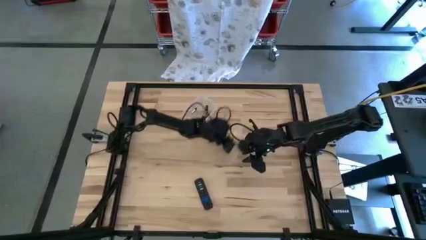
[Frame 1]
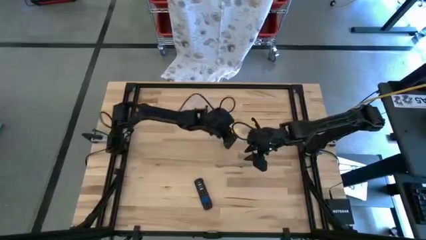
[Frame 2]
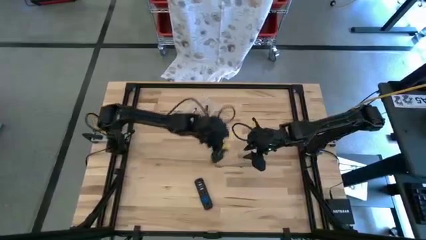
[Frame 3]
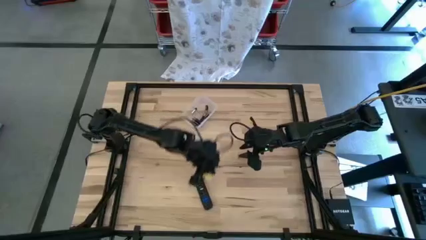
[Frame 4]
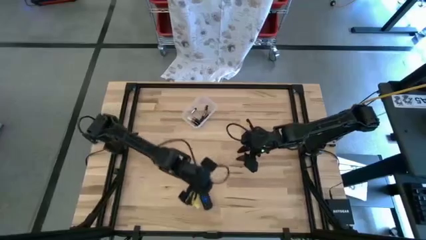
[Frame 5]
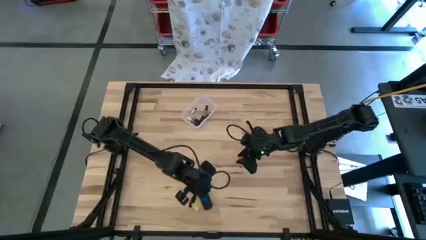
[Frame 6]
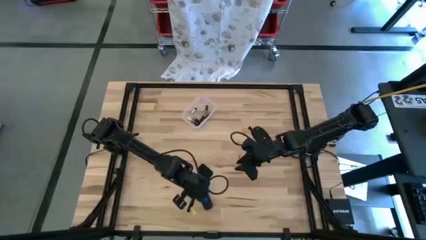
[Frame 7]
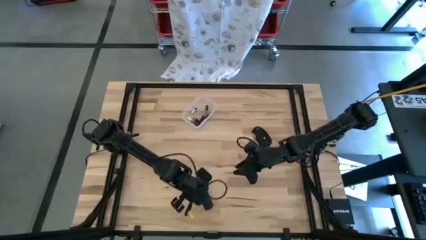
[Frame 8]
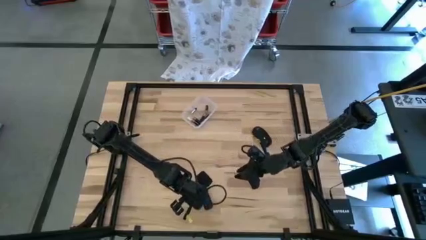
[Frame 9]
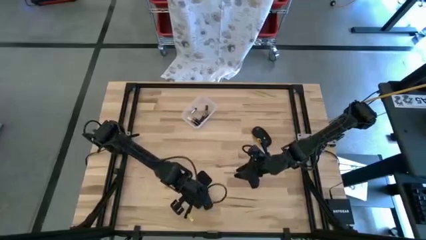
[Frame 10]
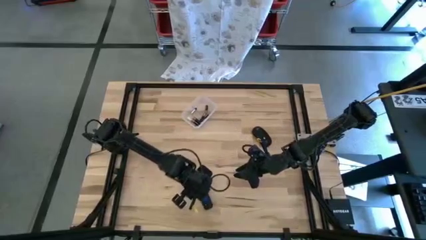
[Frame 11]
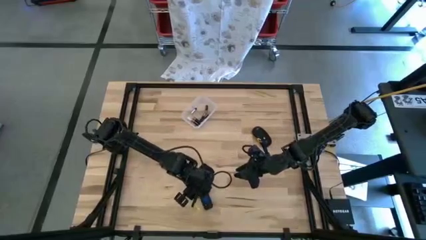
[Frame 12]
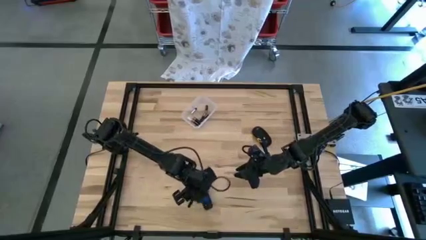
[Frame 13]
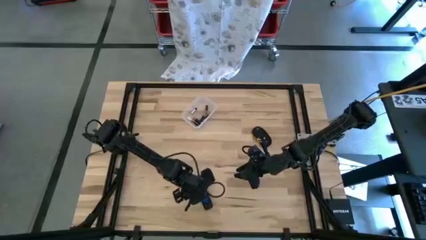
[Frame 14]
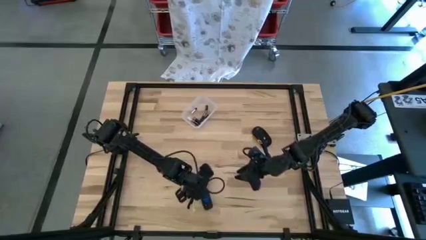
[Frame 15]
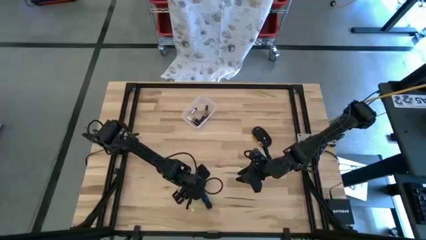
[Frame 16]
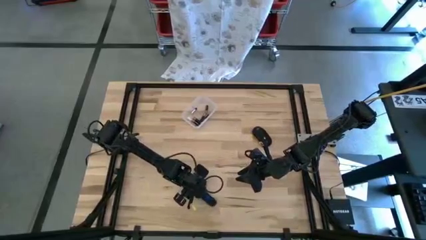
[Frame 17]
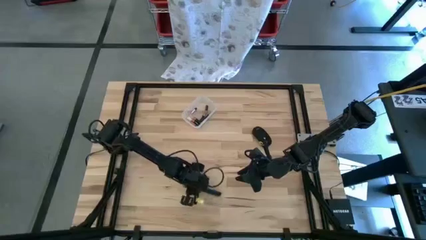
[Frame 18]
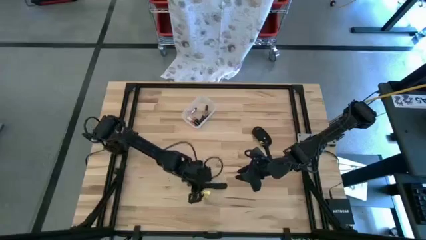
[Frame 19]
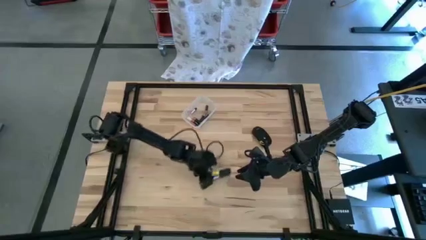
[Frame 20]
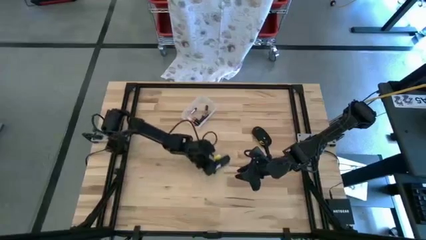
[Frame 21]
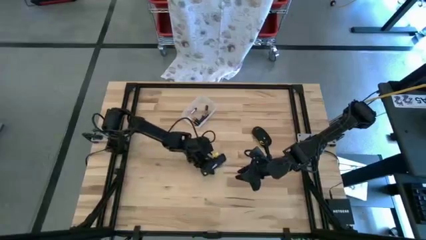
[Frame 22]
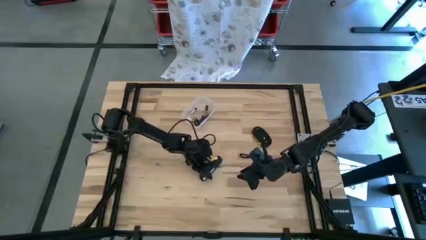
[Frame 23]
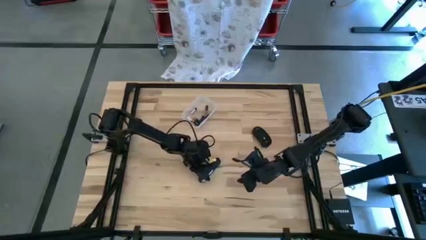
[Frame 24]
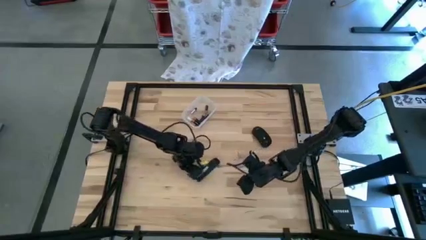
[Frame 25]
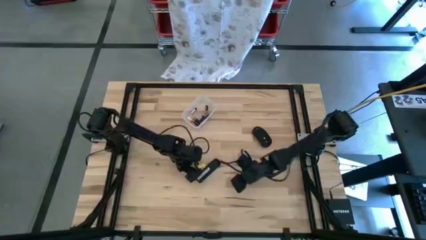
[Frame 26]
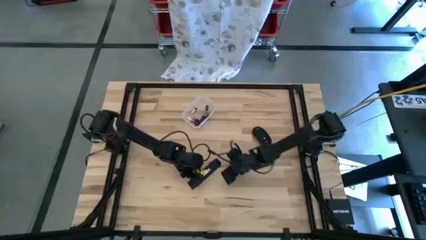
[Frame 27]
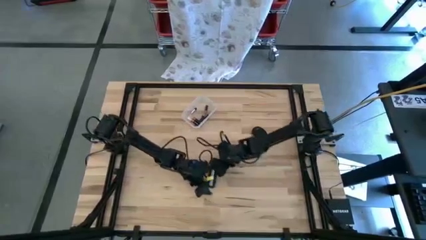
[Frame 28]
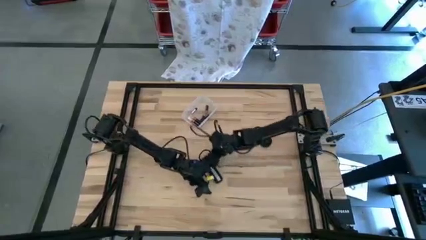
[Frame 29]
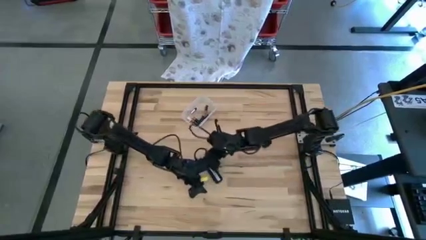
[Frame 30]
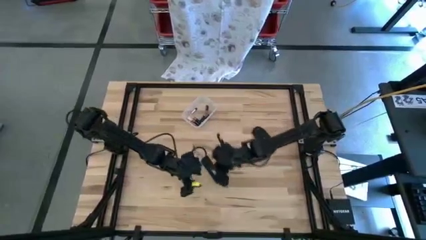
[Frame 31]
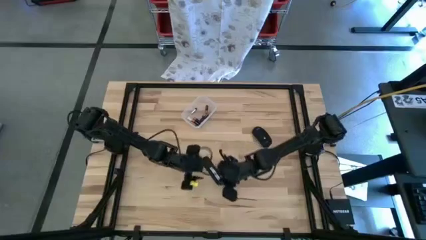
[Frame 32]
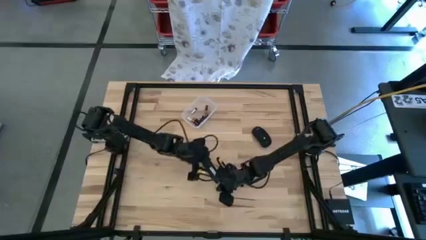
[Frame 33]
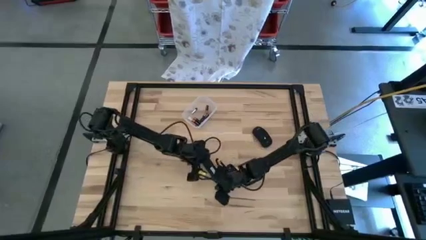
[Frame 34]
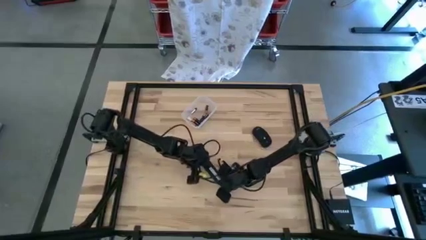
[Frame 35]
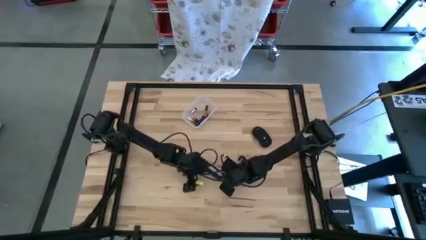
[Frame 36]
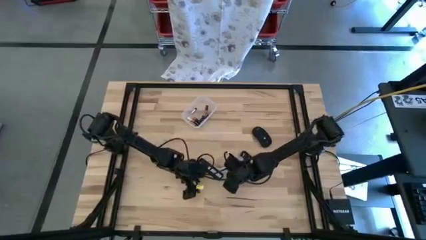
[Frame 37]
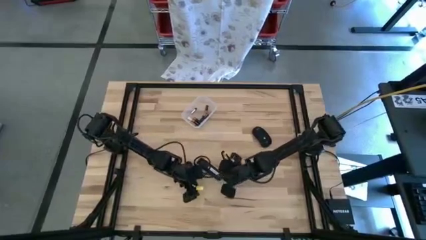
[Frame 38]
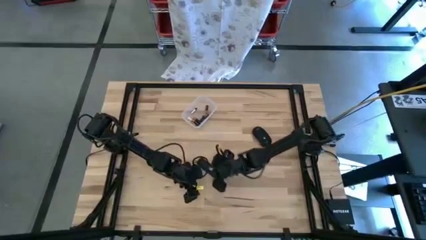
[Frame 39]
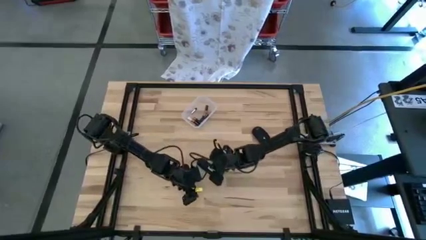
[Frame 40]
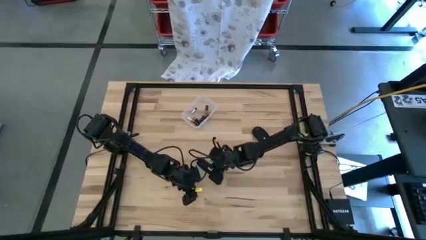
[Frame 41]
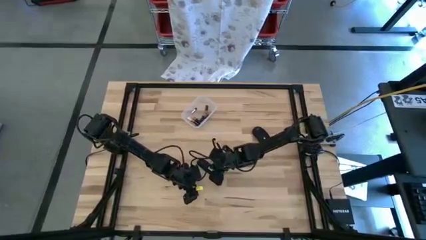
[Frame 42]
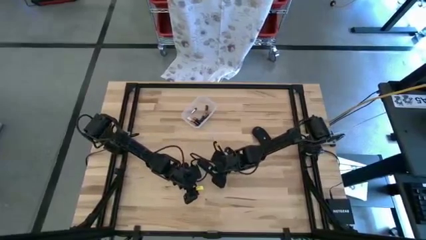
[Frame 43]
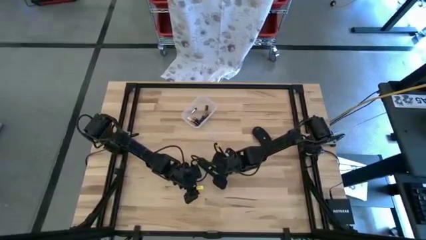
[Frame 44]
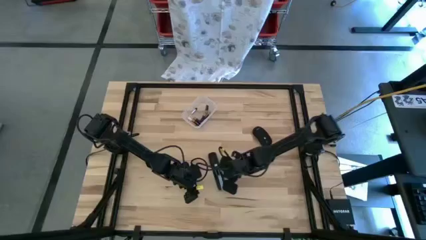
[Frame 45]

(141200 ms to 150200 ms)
Task: Insert battery
Remove the remote lid for battery insertion

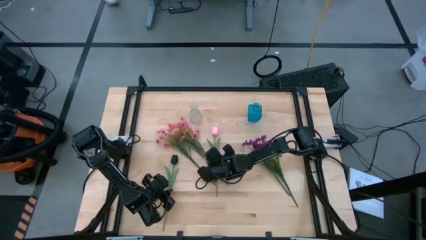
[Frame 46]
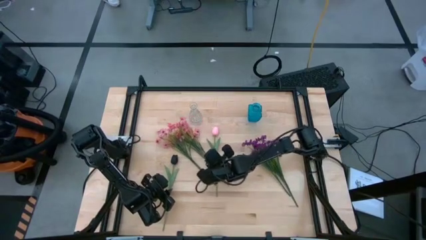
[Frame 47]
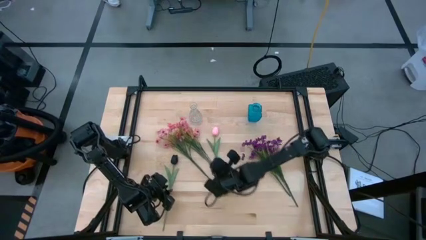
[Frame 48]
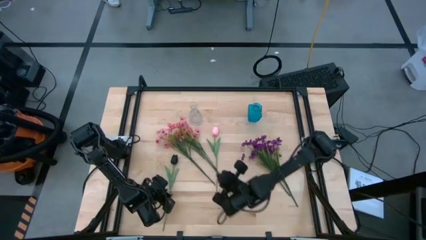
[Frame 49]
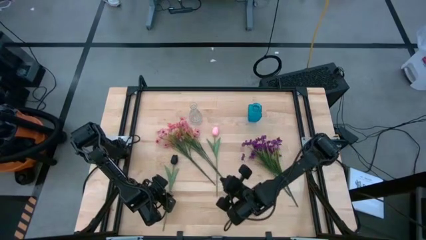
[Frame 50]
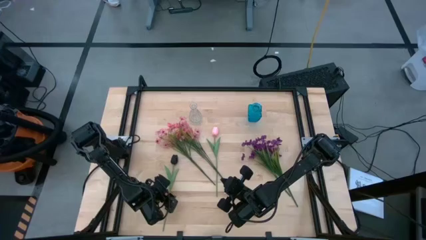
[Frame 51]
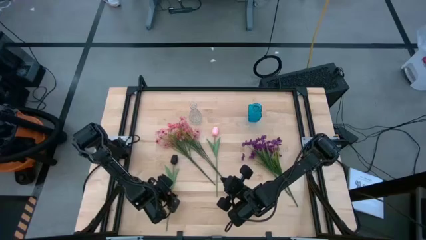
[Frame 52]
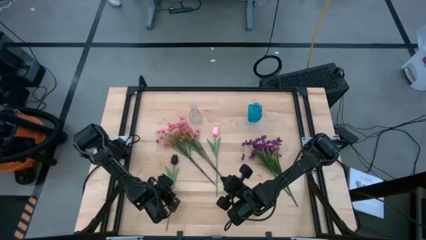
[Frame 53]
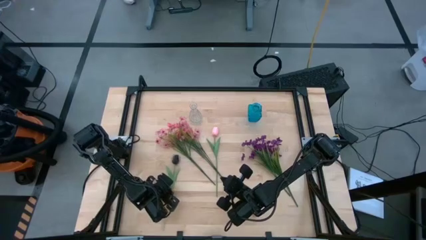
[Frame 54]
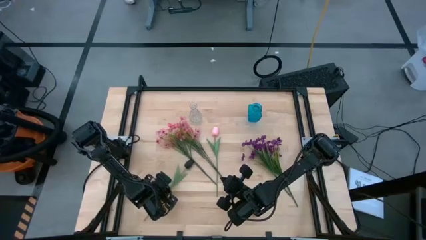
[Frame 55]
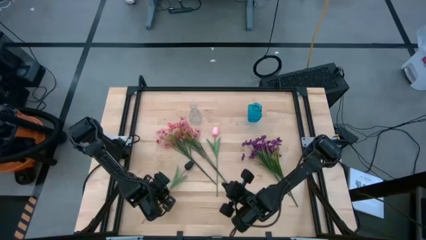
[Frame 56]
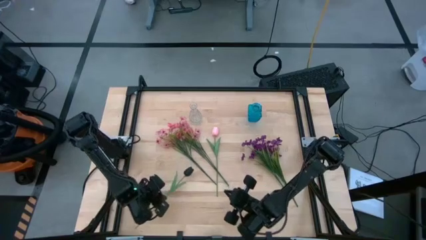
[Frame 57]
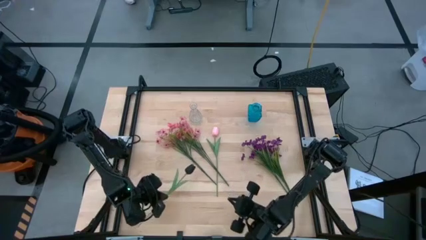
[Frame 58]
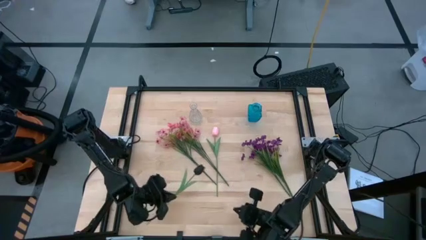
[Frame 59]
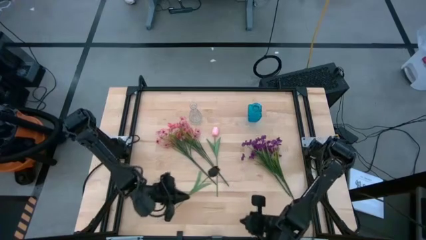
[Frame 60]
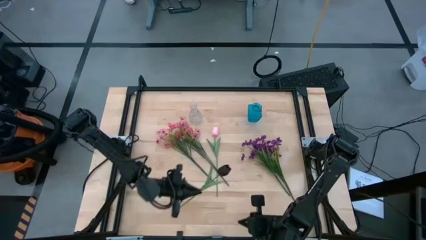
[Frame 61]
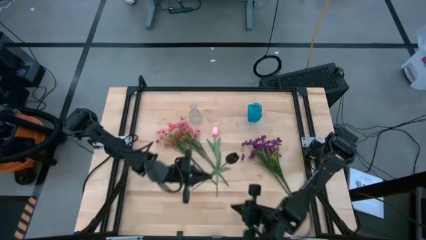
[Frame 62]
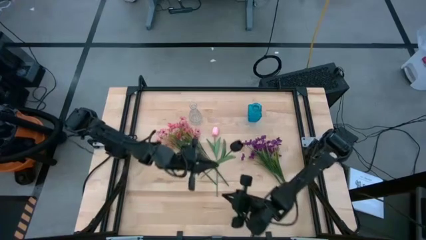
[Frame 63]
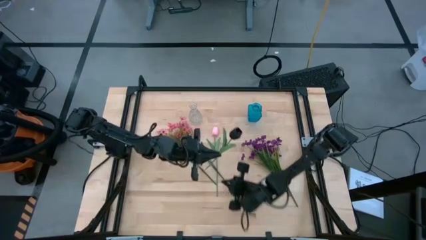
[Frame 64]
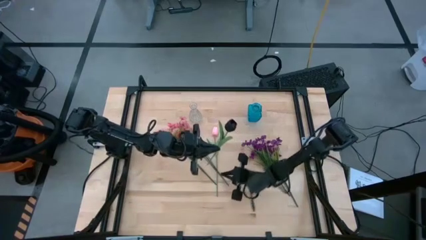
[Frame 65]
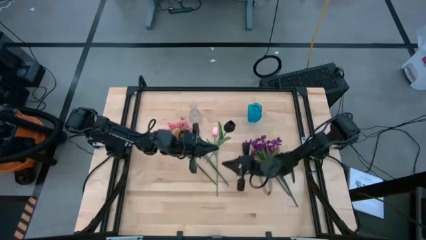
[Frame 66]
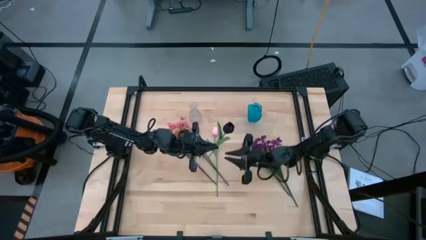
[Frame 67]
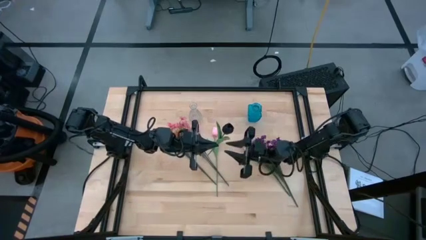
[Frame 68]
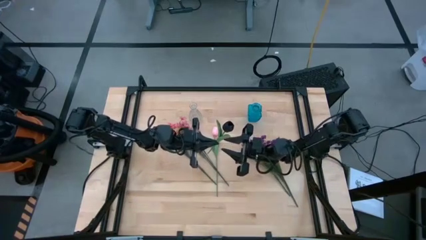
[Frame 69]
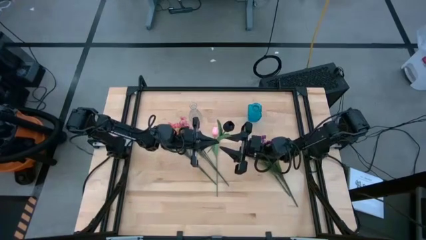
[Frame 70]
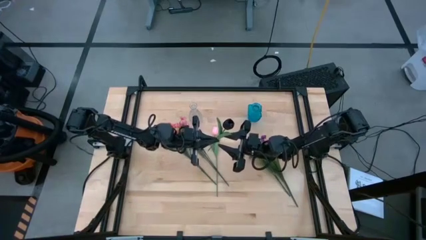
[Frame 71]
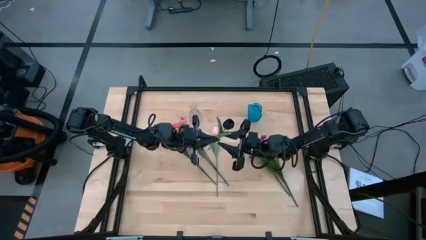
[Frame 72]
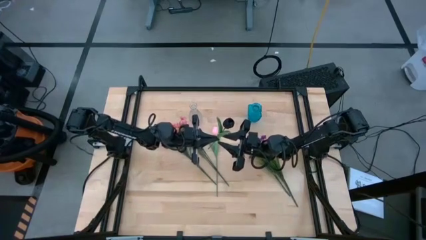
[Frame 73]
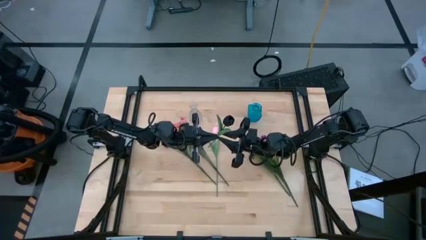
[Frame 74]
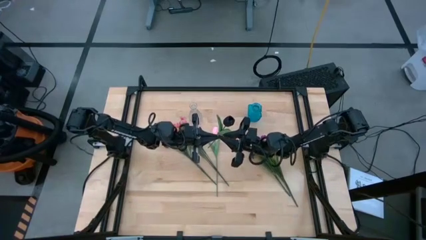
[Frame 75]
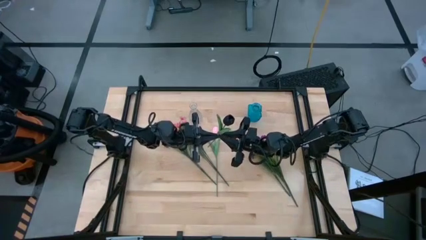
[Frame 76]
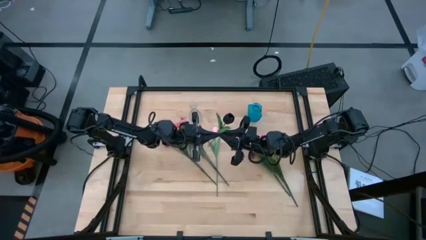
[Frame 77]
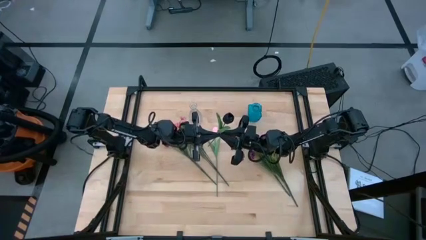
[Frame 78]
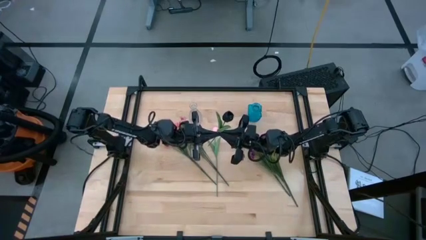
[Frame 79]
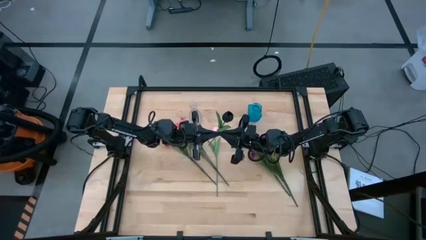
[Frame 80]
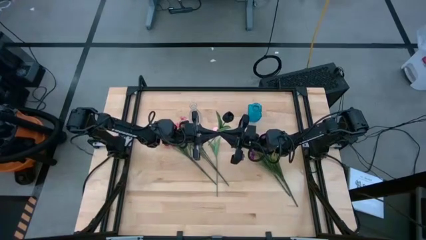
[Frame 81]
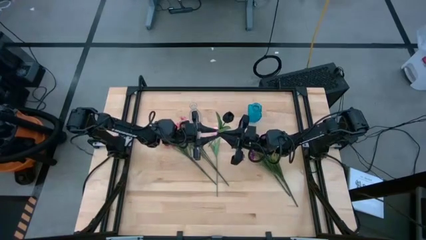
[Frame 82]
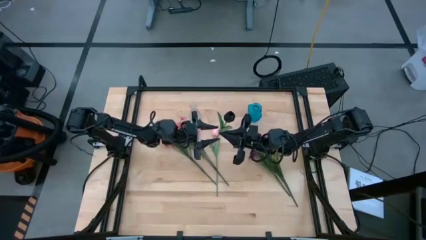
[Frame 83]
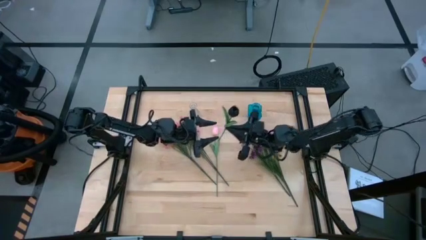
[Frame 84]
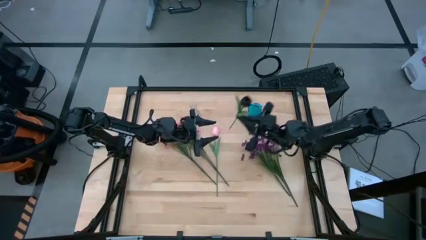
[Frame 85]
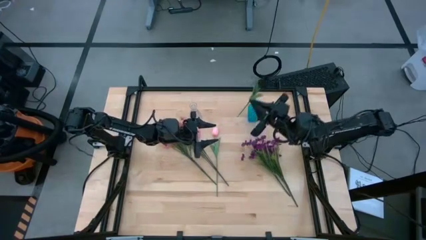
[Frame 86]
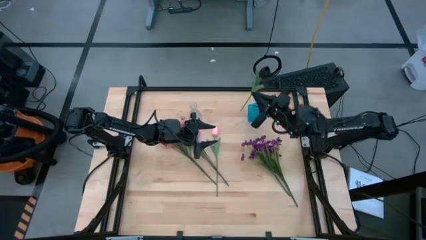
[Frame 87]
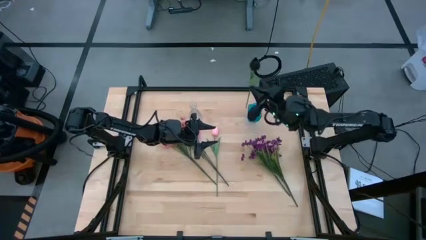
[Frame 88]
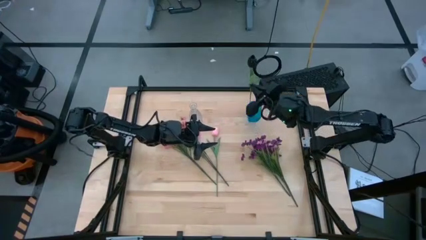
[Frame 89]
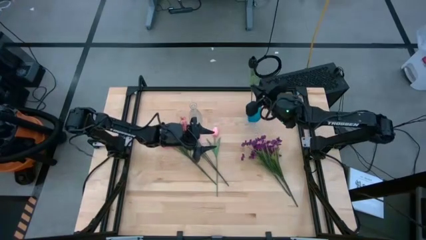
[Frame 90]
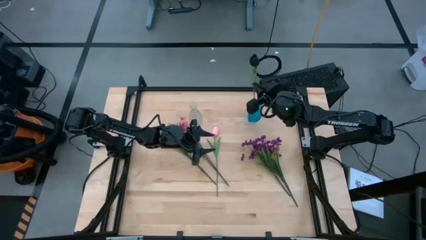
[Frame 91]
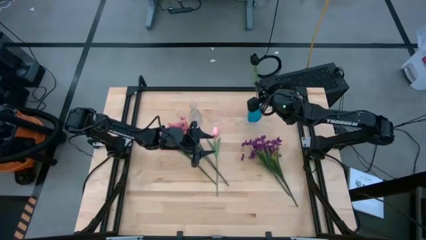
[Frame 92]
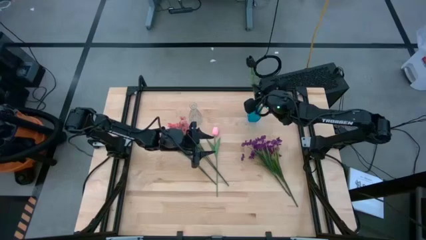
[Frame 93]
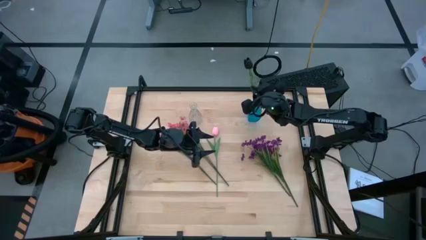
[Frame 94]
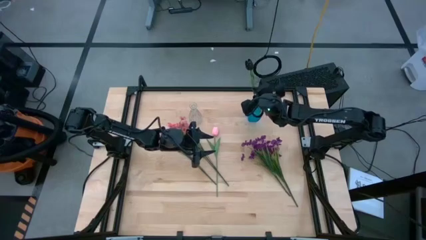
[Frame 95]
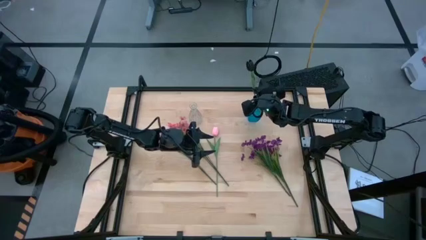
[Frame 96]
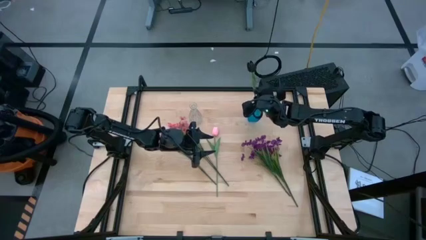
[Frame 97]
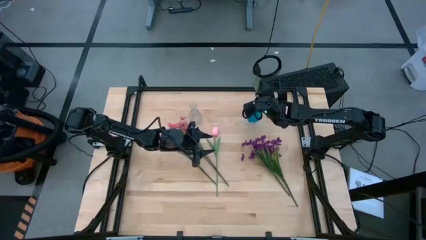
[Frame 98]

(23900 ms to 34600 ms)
Task: Sort flowers into vase by color
Put the black flower into the blue vase
